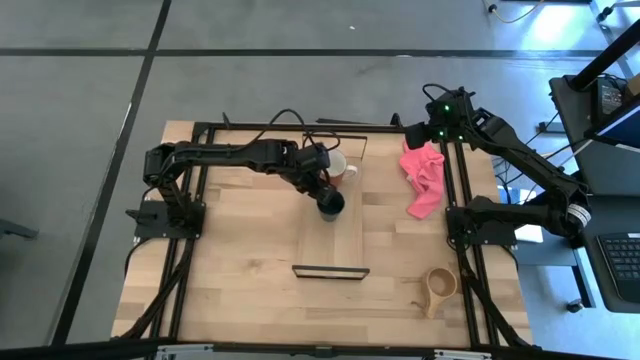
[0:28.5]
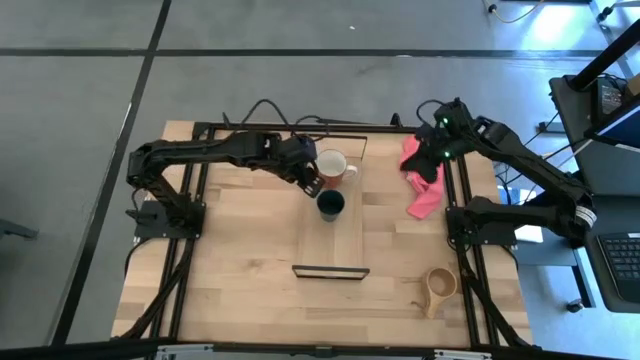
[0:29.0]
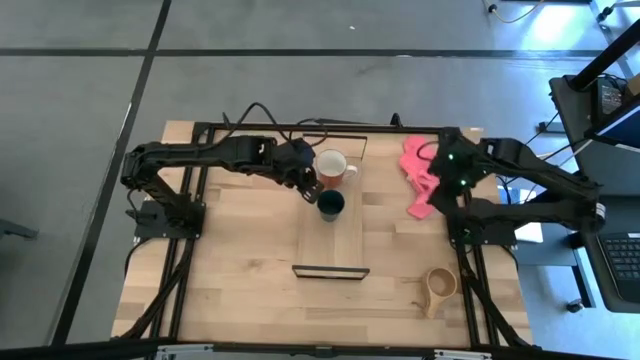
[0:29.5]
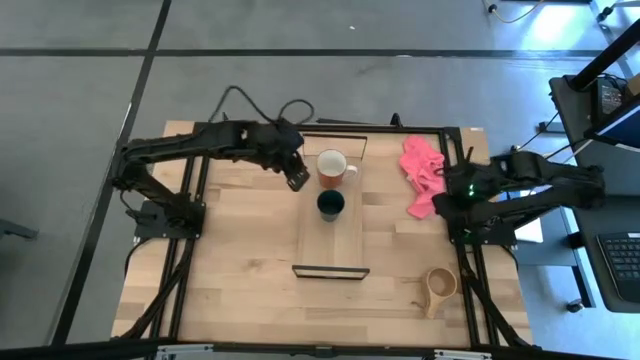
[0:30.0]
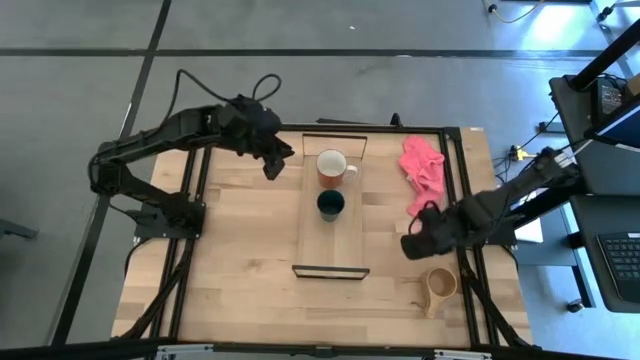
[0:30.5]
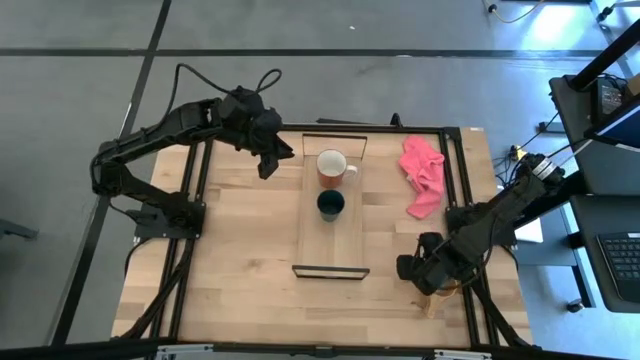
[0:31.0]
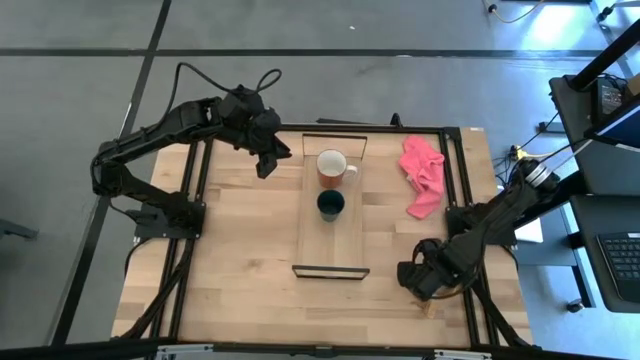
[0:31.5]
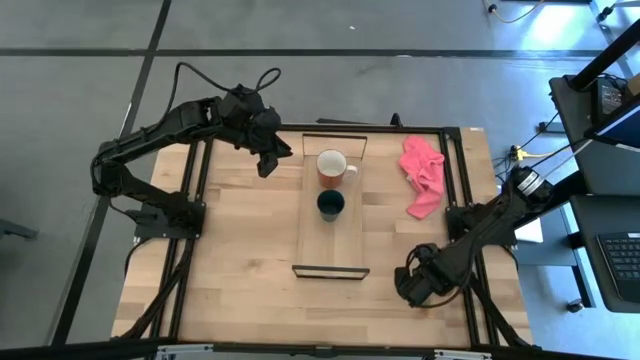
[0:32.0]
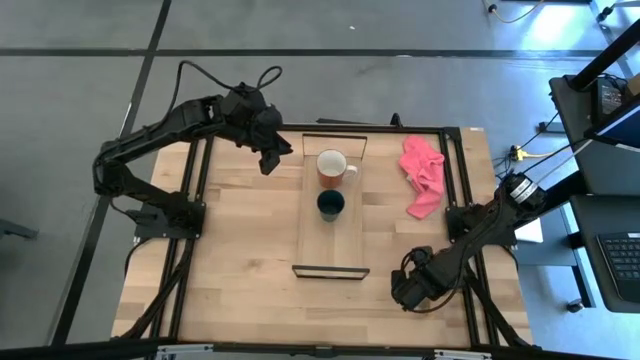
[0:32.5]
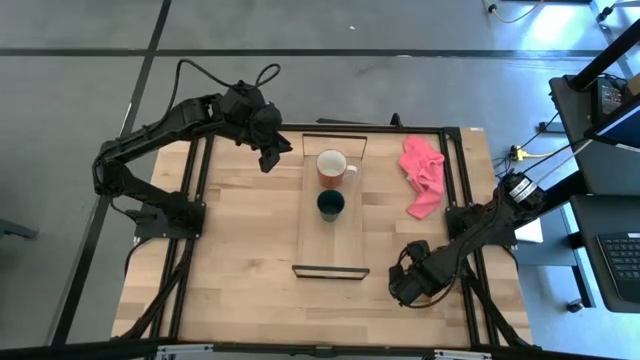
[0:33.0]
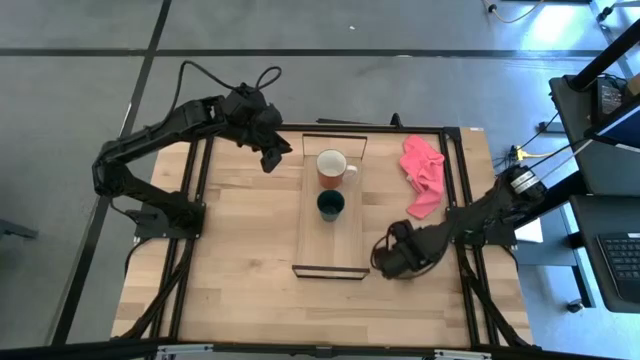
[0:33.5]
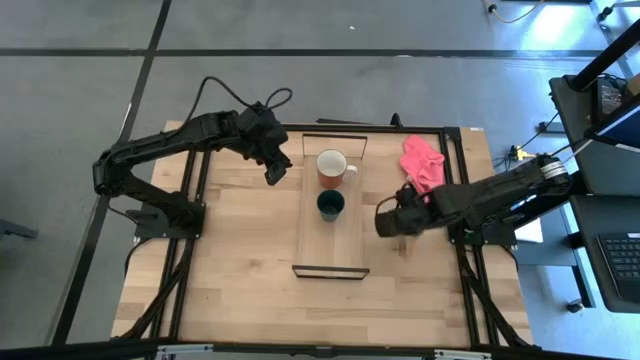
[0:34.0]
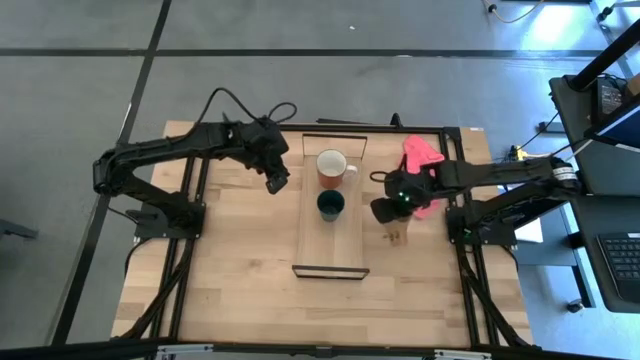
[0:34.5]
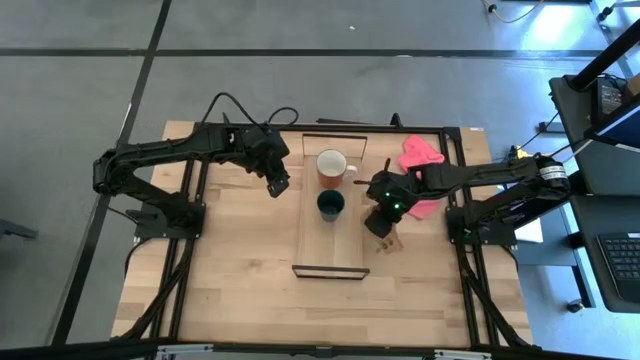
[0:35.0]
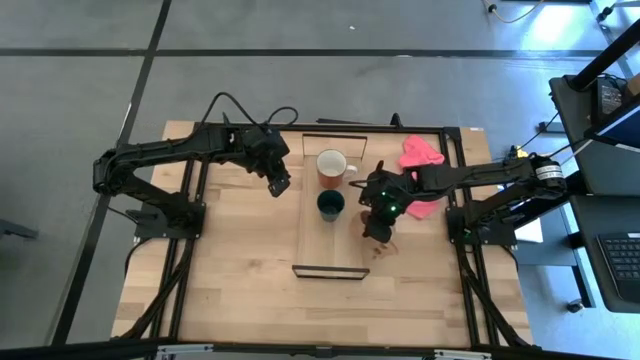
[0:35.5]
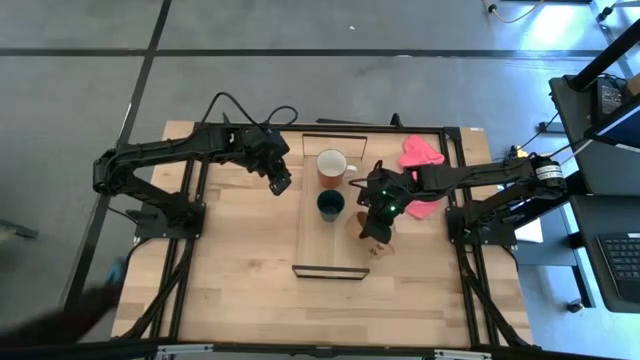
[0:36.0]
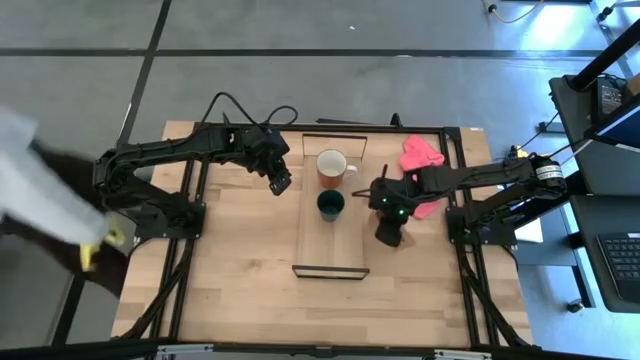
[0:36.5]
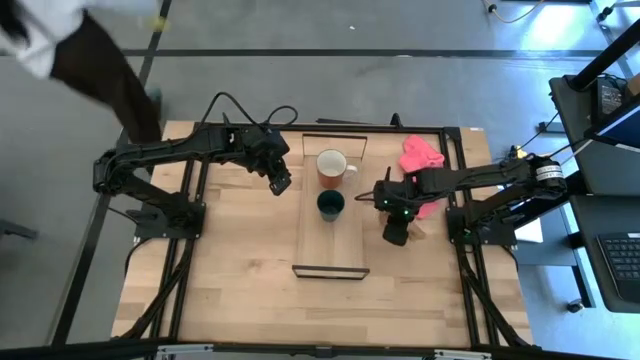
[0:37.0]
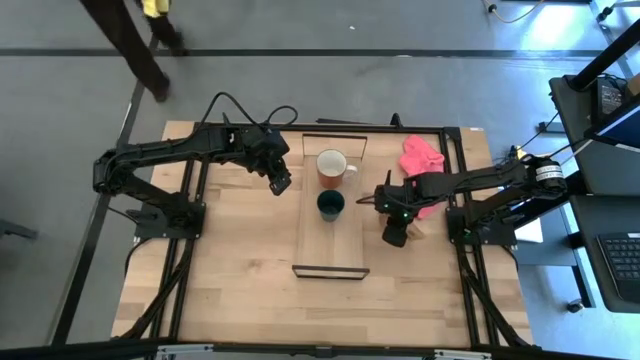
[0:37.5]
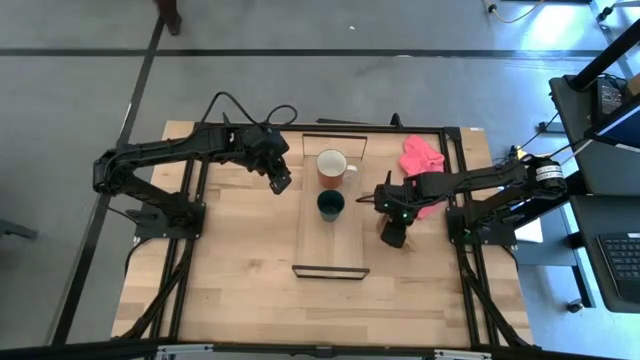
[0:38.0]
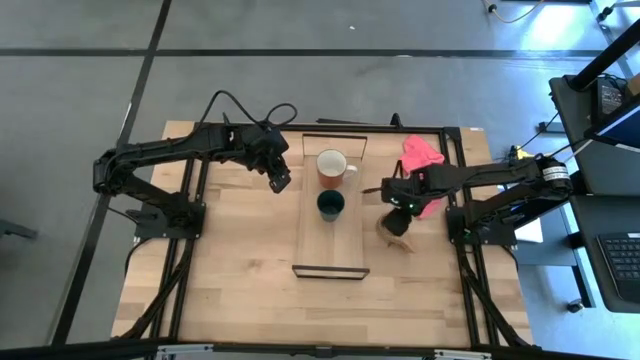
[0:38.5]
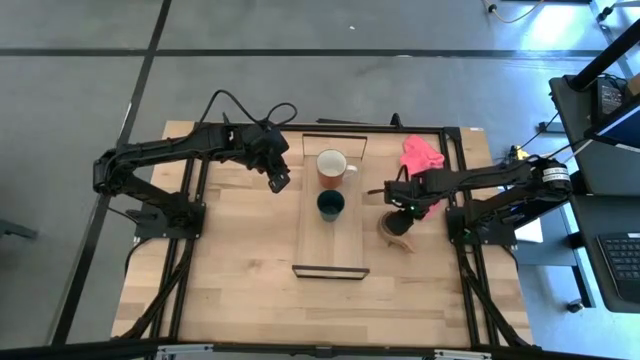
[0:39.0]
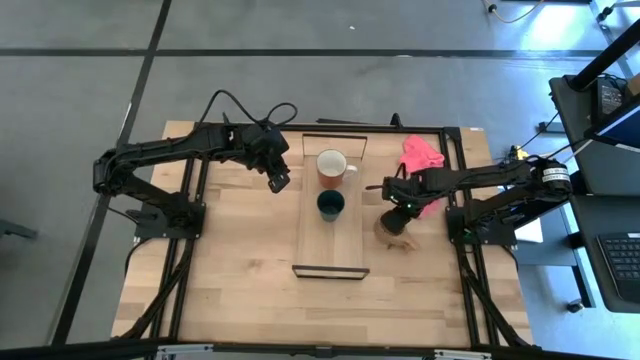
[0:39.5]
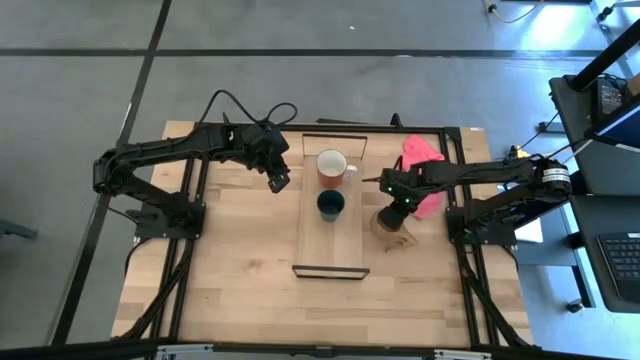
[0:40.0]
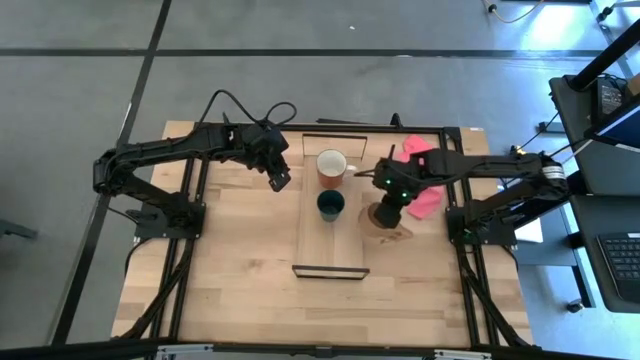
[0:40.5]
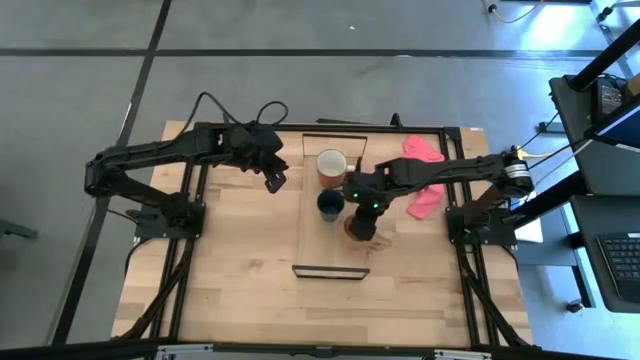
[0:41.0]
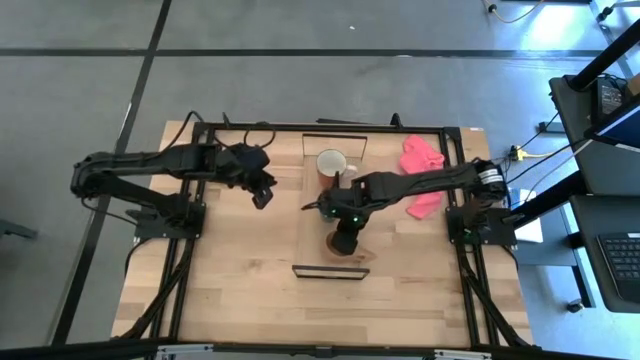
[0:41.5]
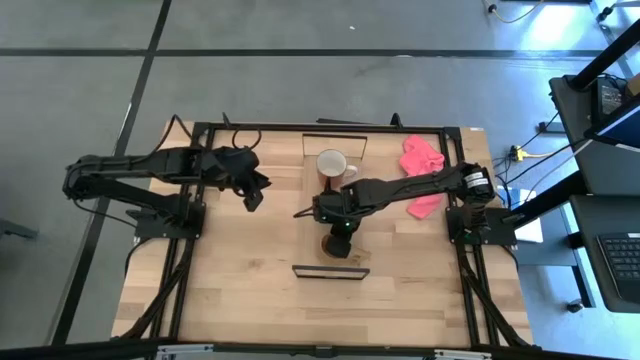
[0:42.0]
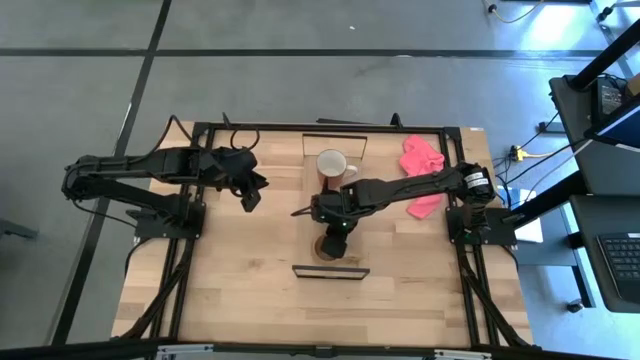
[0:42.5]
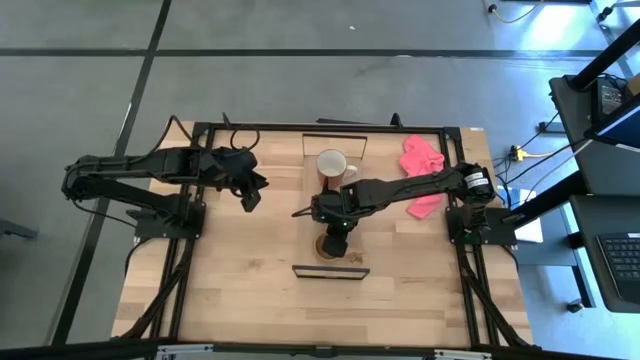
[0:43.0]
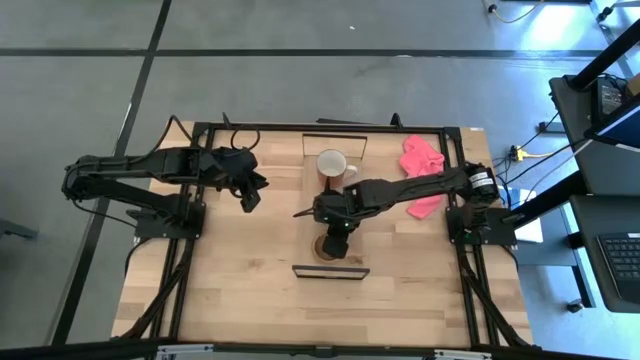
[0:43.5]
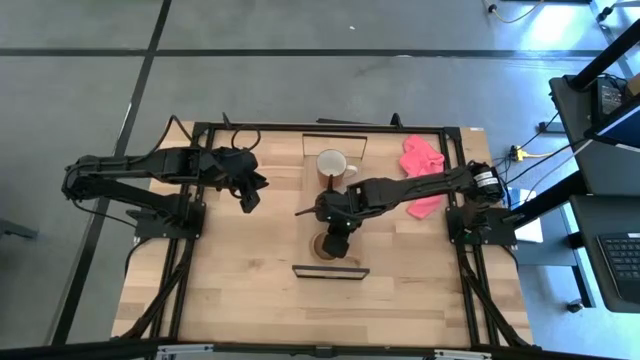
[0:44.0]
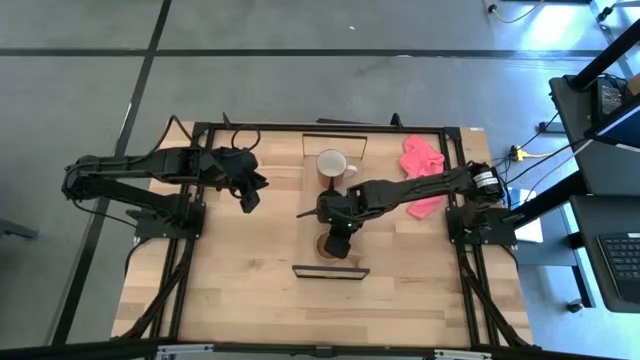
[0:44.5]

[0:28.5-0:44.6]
Task: Stack small to large cups/mugs on shelf
Put the brown wooden mug on the shelf

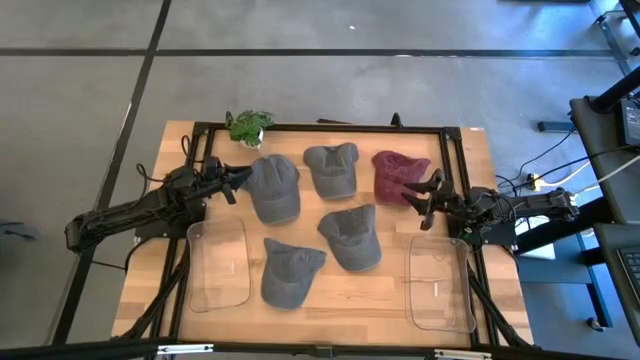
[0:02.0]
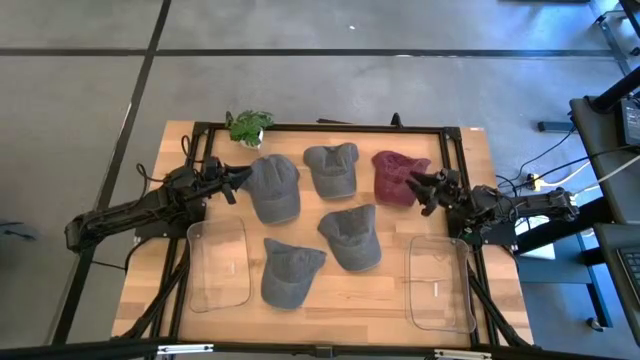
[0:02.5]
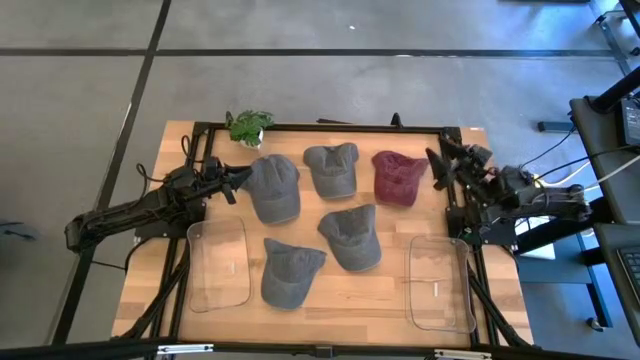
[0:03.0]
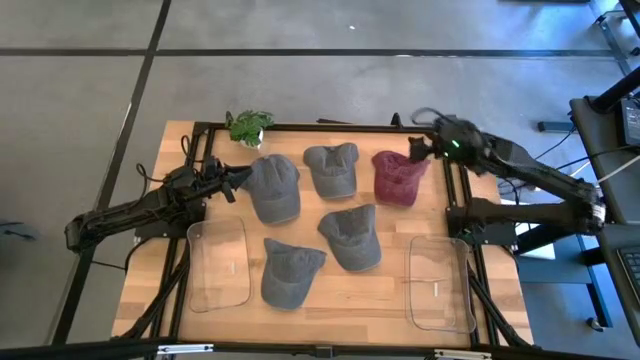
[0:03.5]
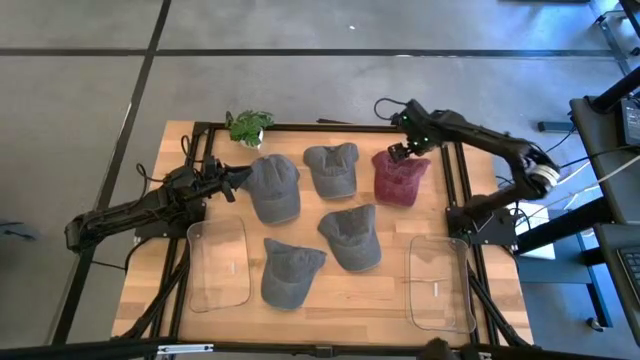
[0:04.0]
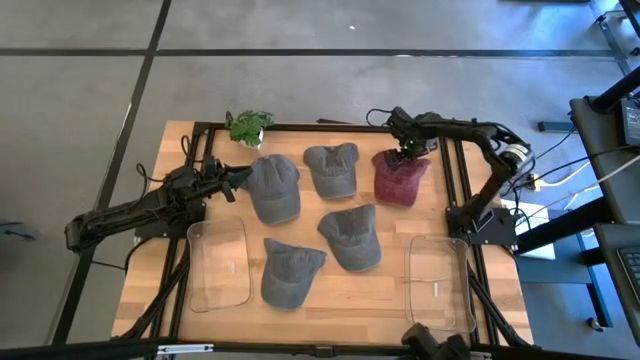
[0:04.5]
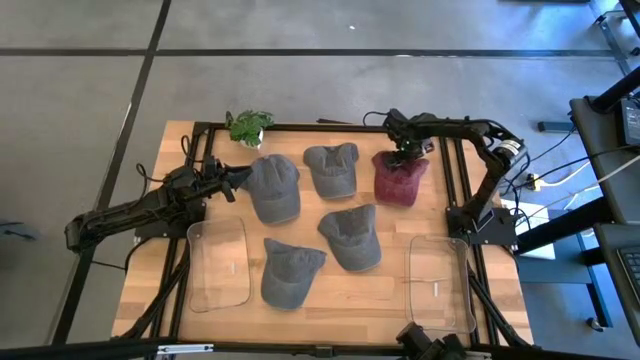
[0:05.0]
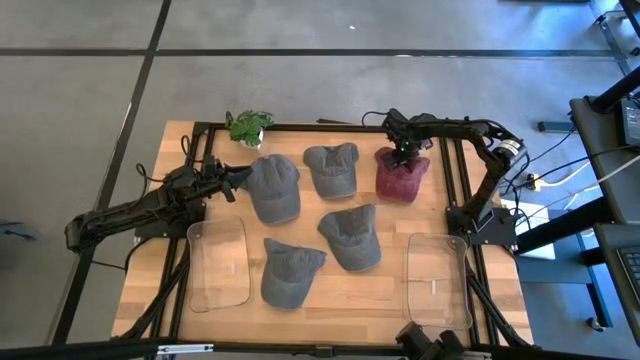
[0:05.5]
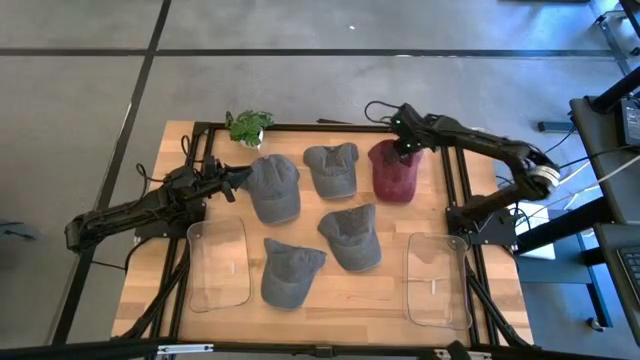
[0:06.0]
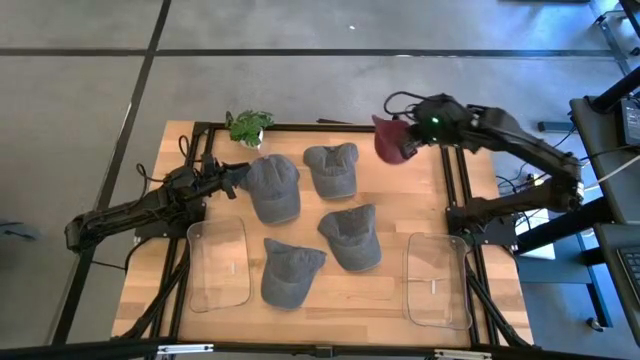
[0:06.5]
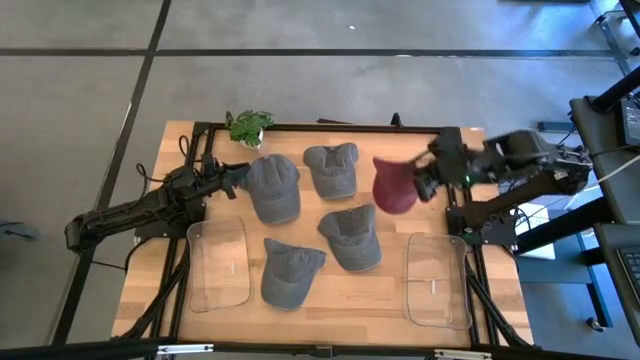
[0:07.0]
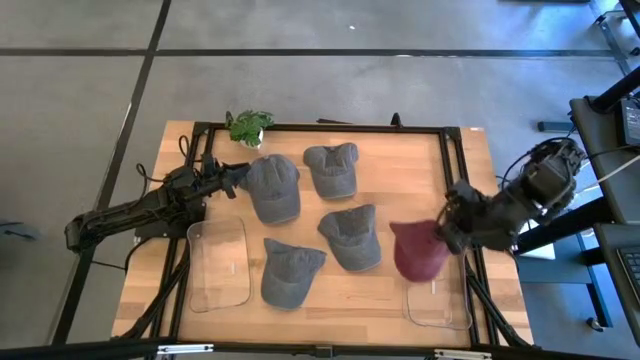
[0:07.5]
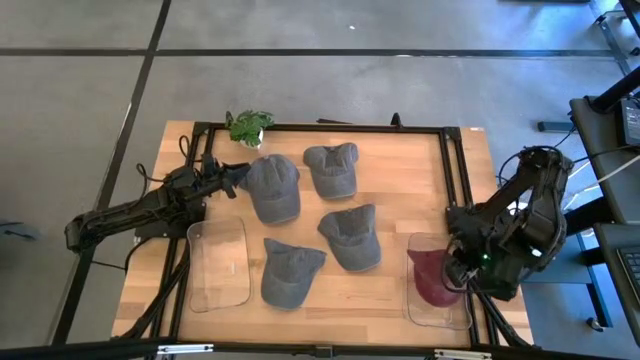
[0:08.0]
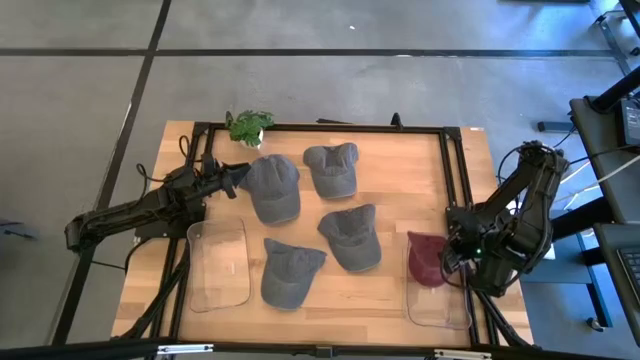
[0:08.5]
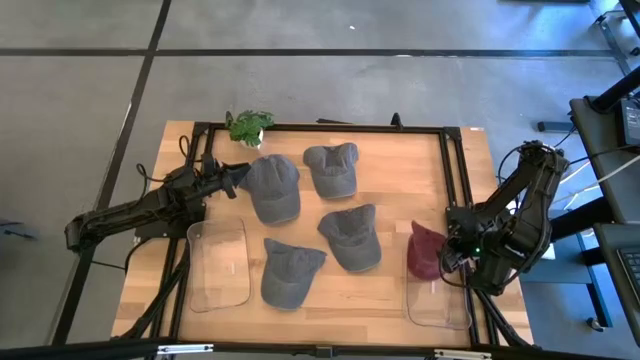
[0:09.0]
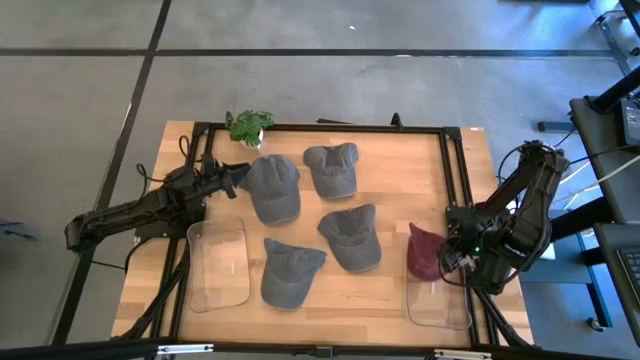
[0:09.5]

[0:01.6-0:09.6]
Task: Pick & Place hat
Put the red cap into the right transparent bin
